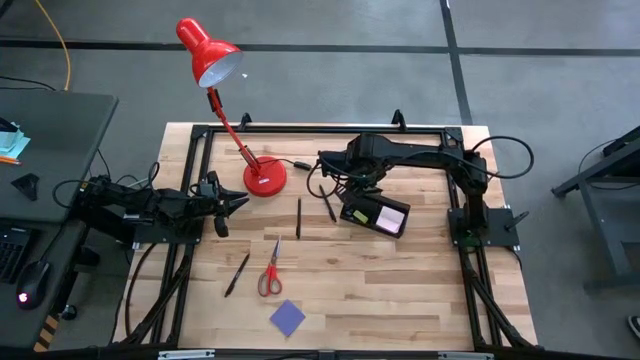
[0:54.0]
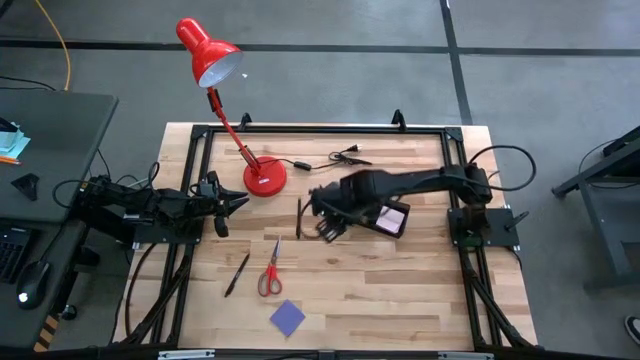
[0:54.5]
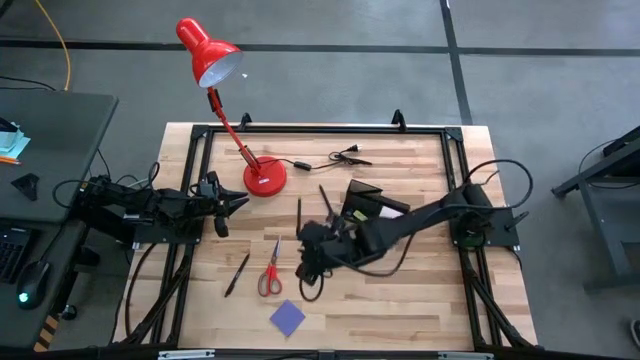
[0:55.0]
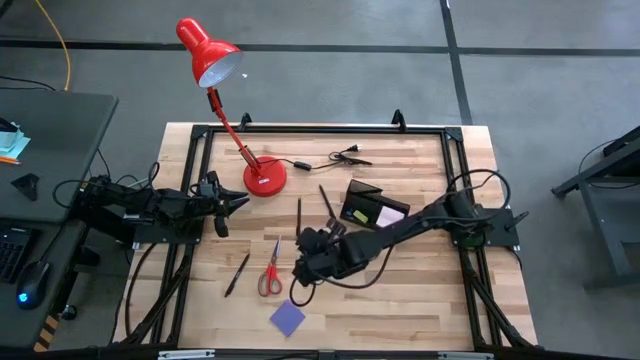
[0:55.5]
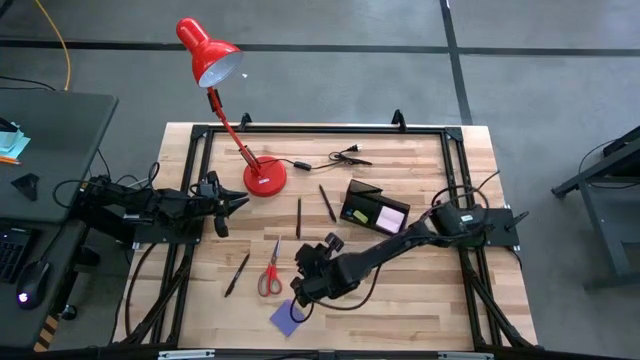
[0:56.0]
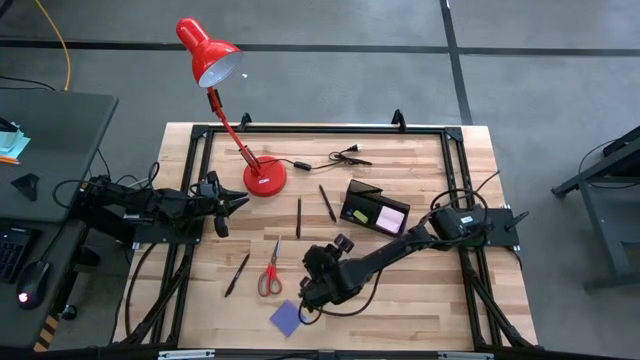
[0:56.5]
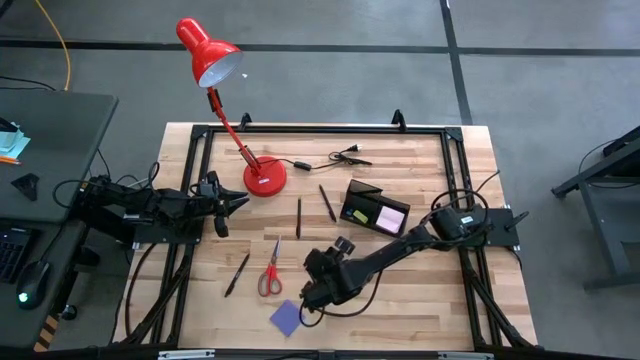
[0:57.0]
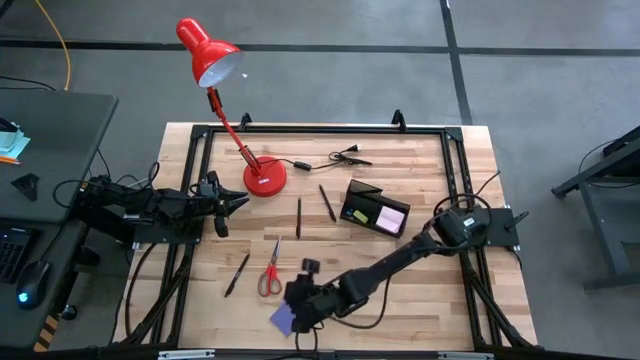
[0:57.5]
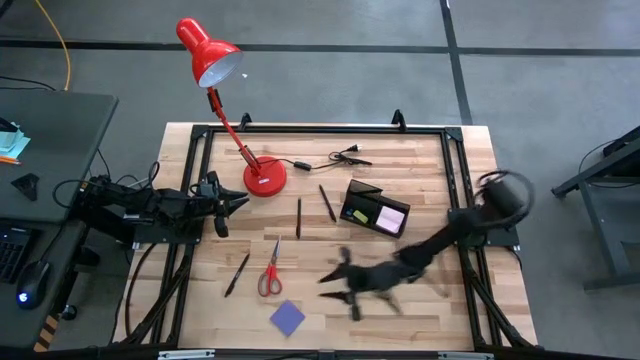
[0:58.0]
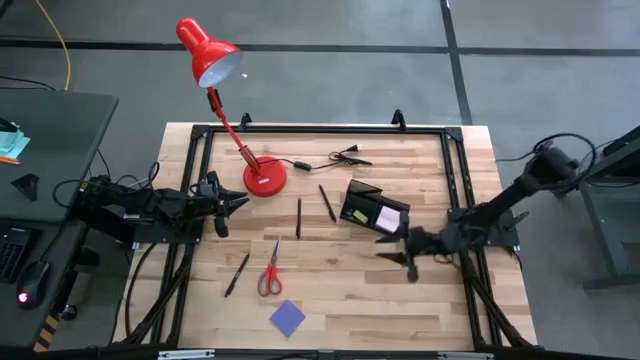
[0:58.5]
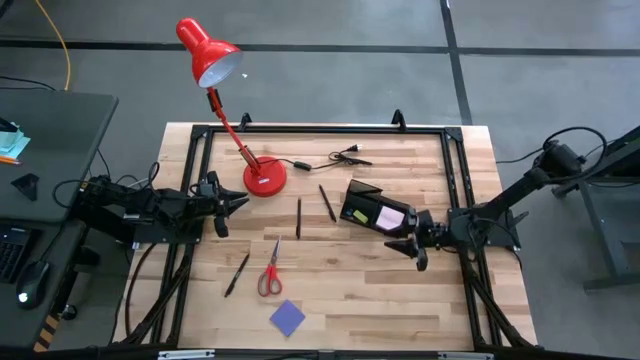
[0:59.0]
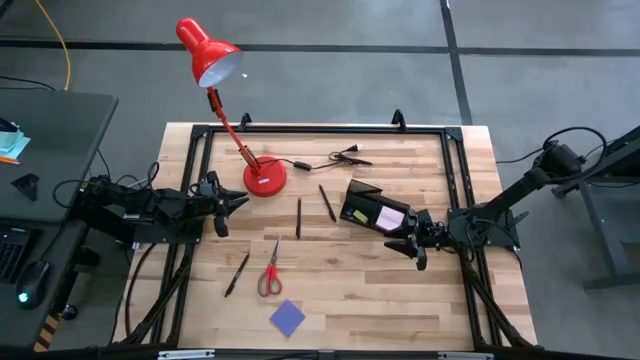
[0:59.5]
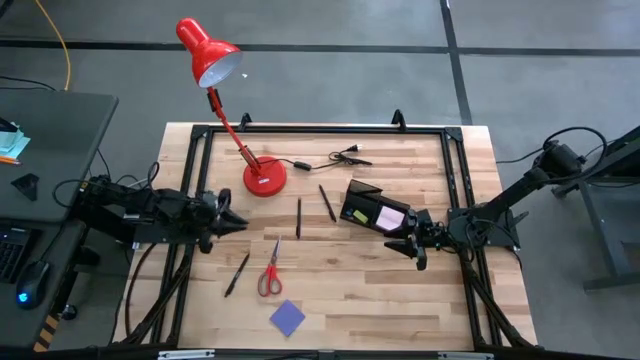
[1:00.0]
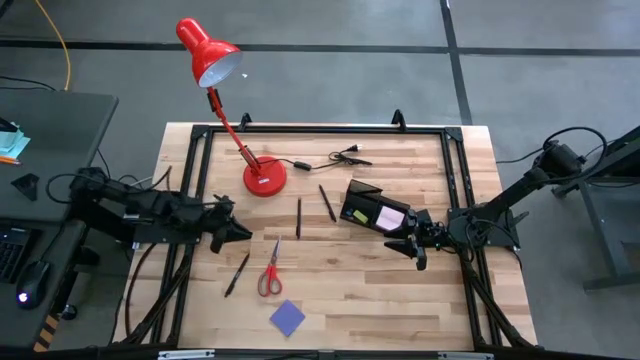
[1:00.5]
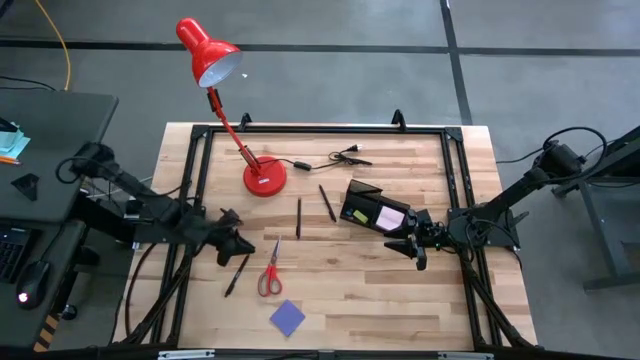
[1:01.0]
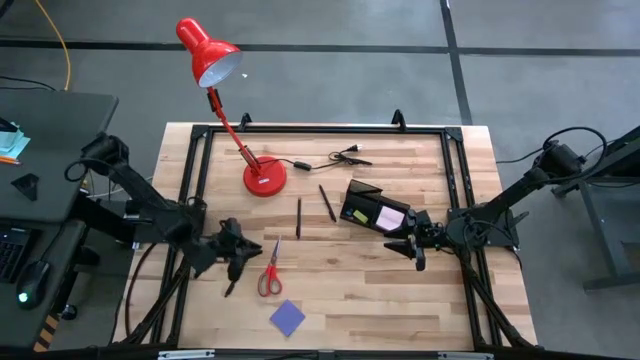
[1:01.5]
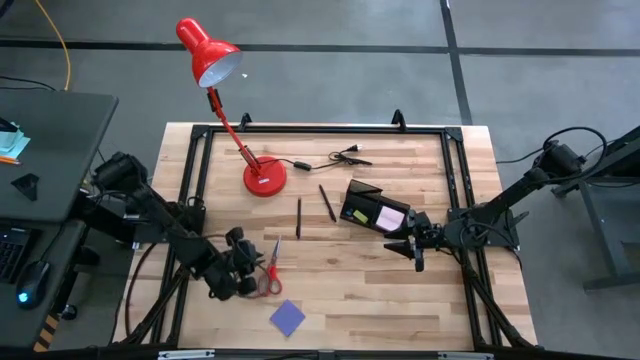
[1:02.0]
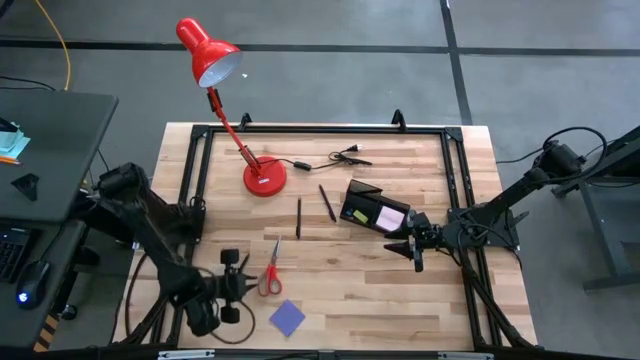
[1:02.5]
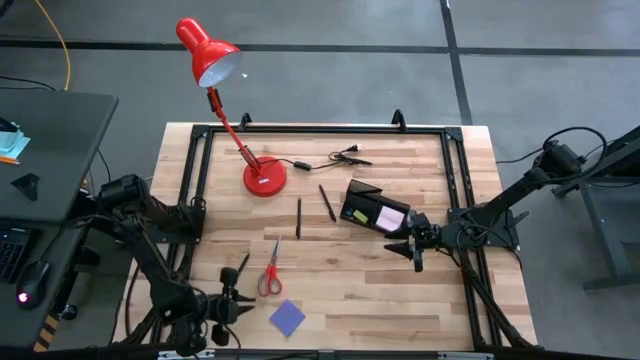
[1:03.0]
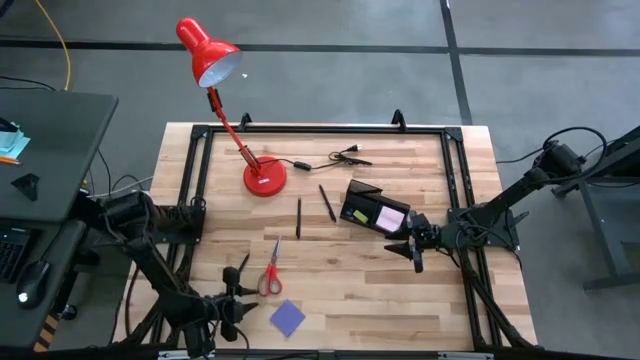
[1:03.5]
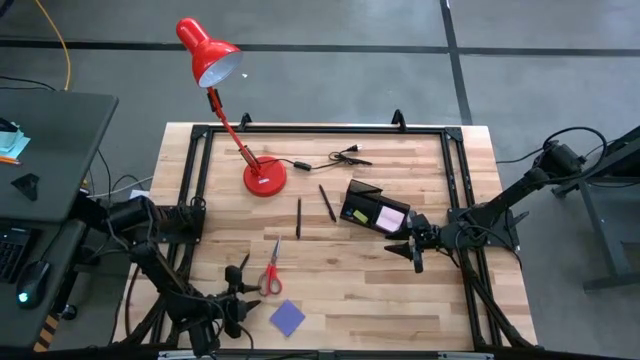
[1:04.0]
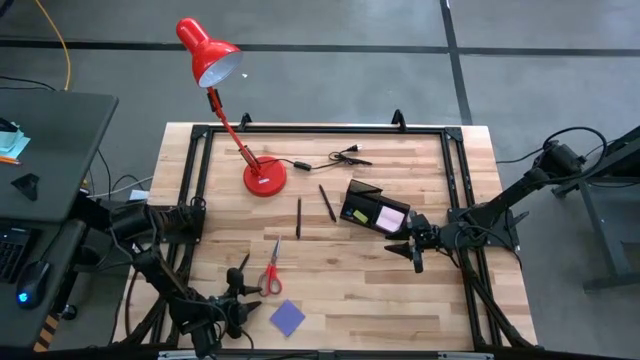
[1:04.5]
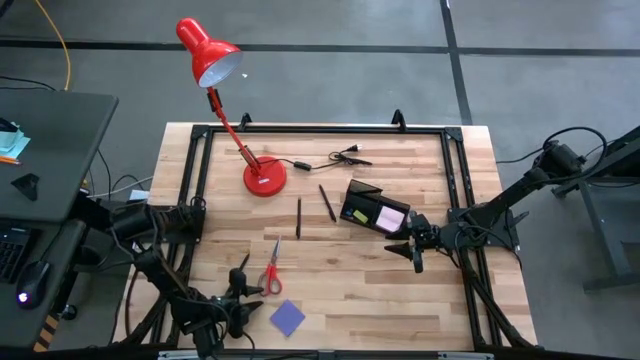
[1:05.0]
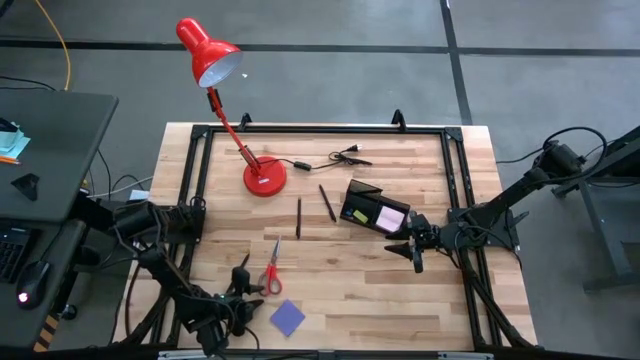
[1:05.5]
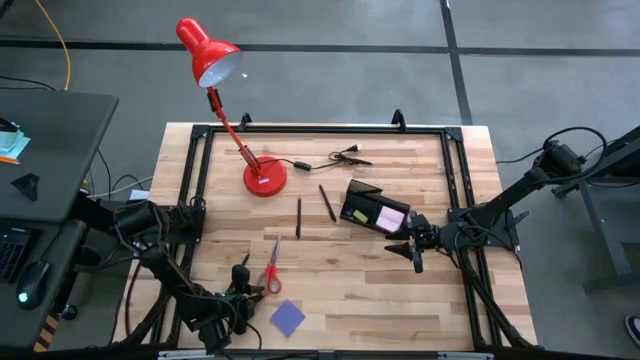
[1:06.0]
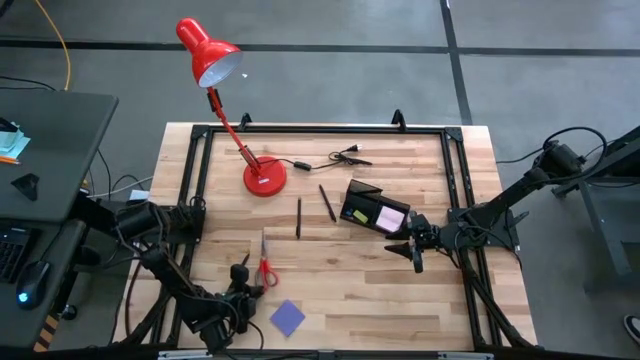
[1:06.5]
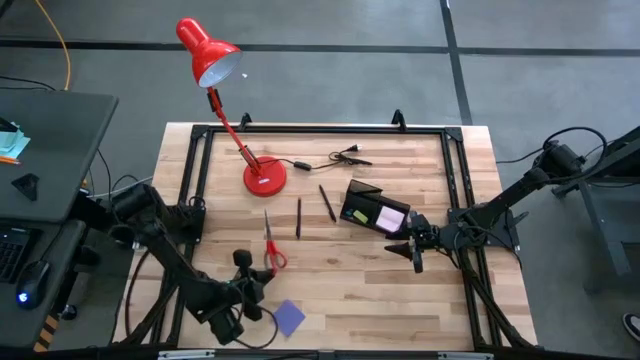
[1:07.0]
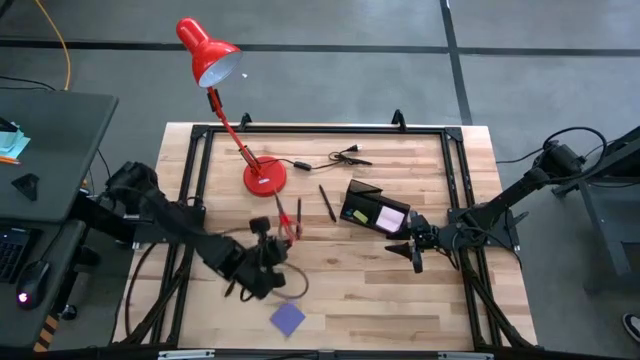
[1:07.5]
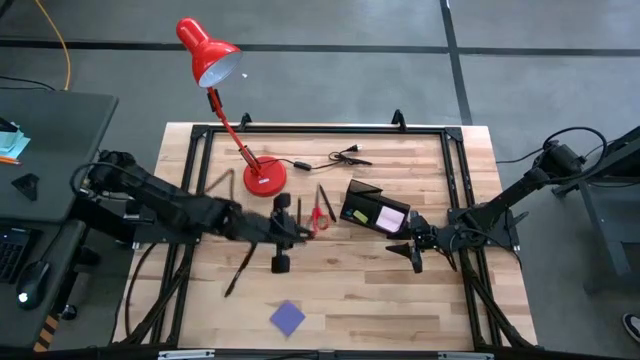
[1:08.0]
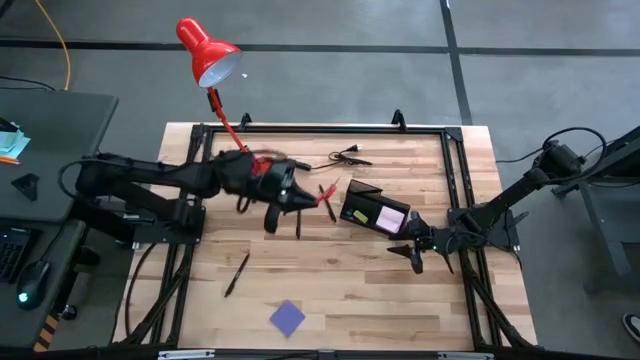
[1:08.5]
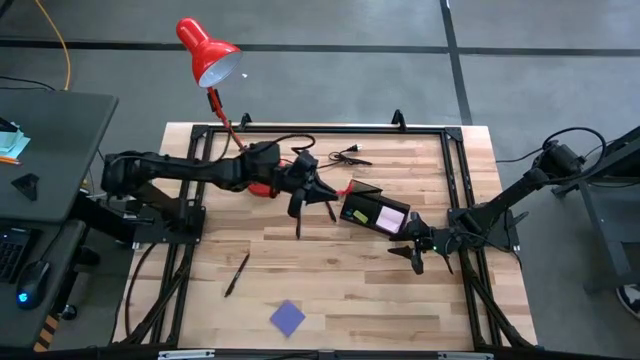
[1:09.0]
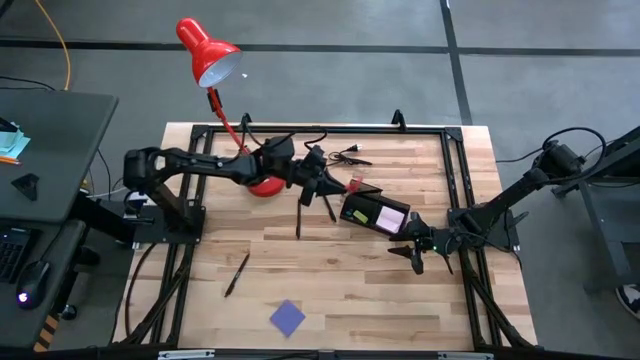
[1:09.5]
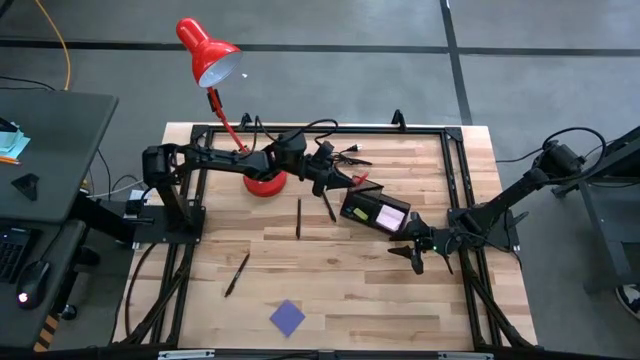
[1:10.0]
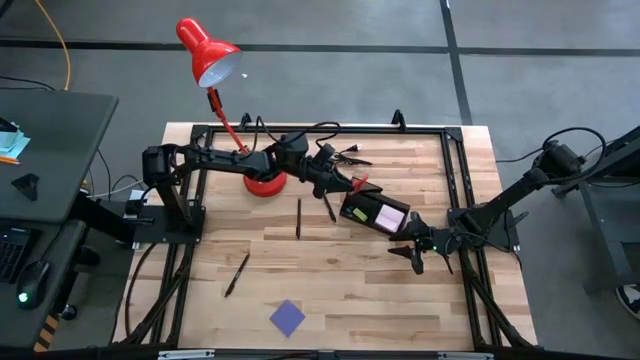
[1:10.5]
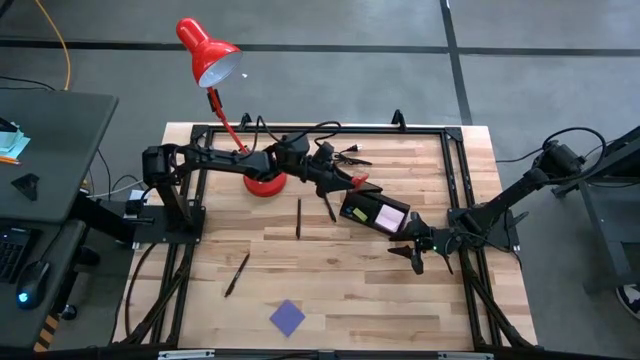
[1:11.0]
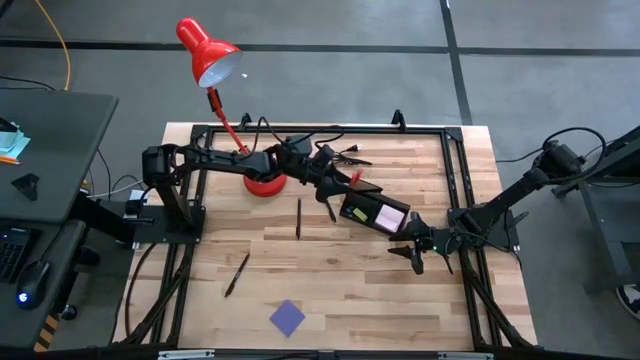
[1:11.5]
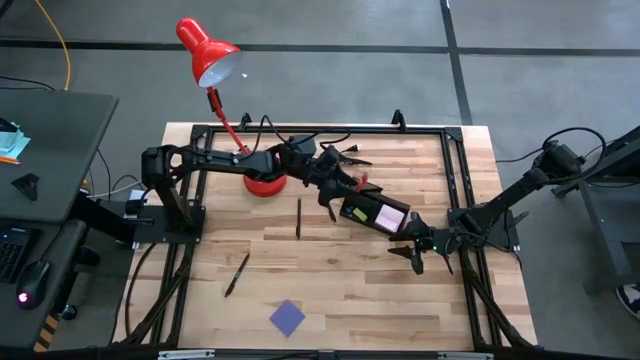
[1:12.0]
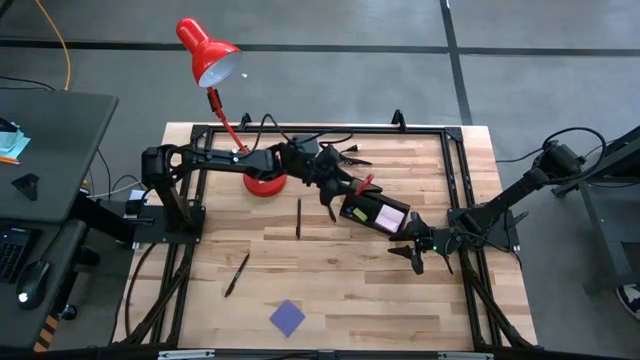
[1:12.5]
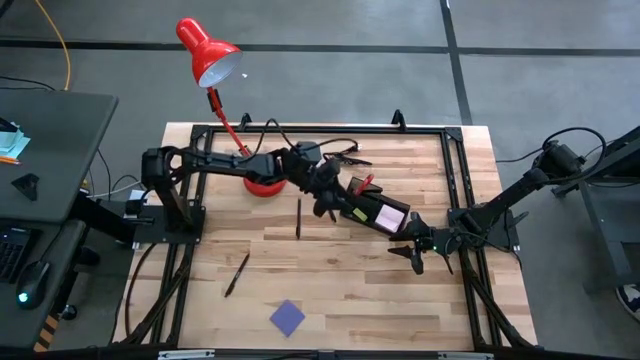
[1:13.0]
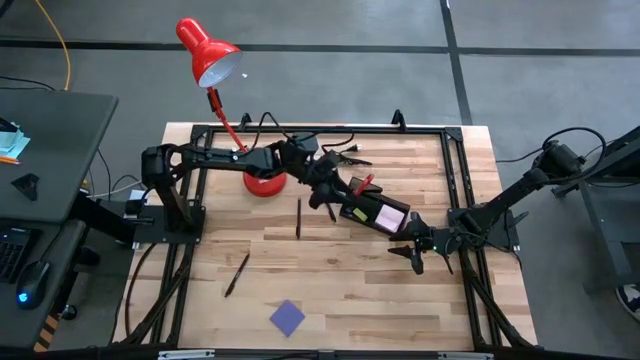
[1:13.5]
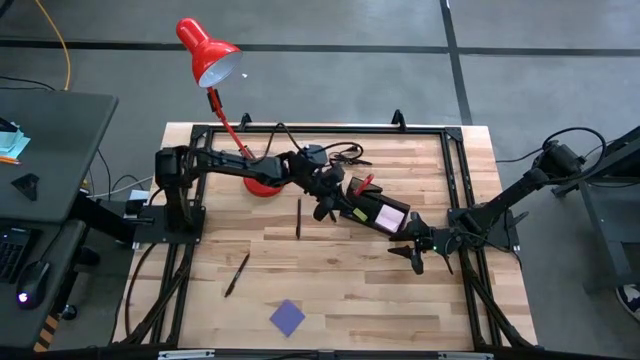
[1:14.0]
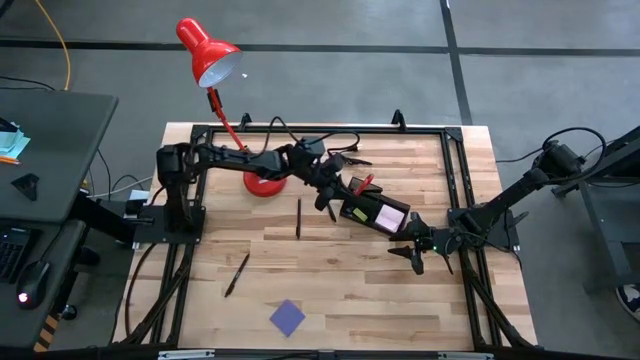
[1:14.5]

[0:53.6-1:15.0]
Task: Pick and place office supplies into organizer
Put the red scissors into the desk organizer
